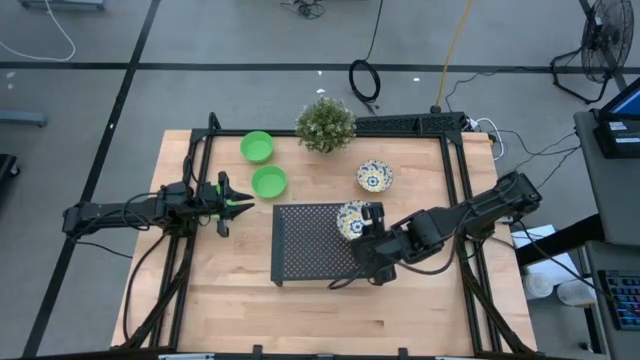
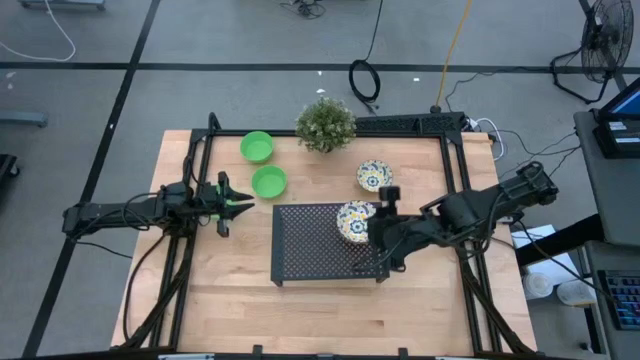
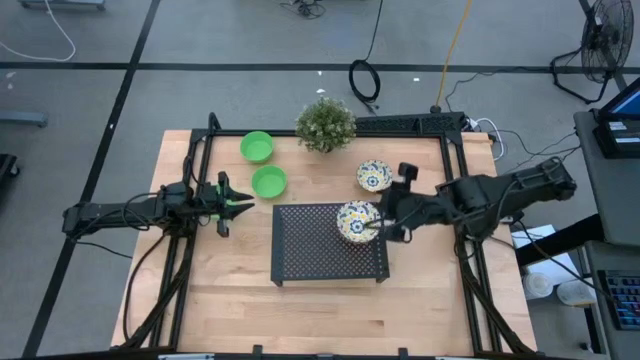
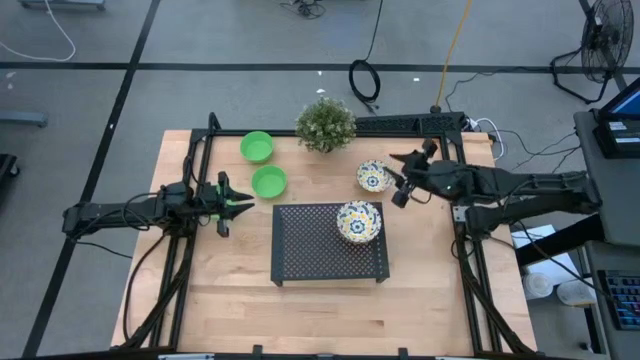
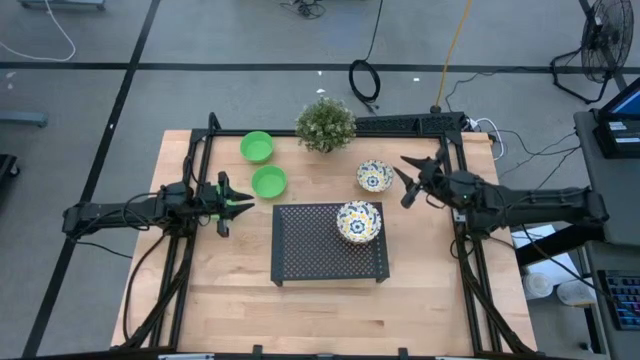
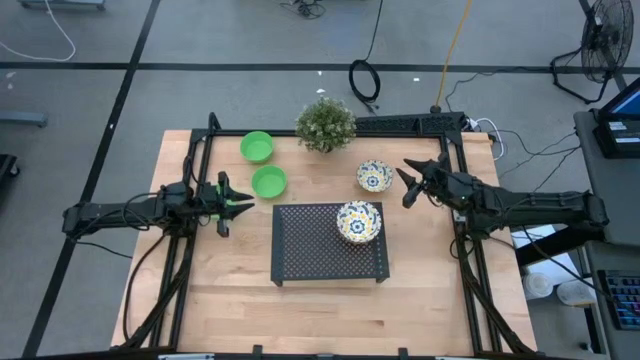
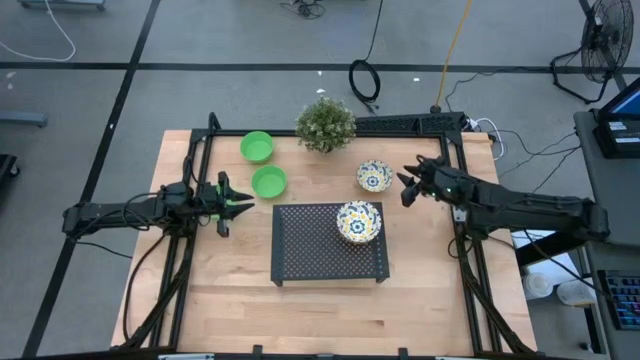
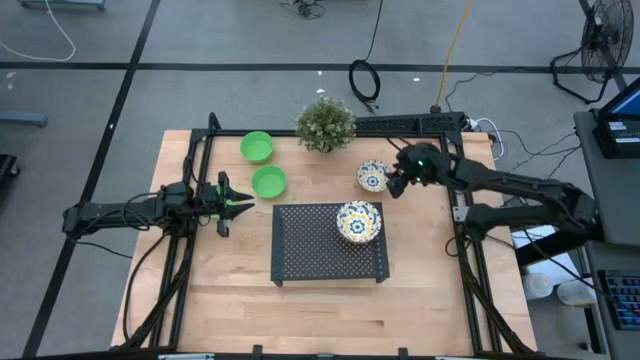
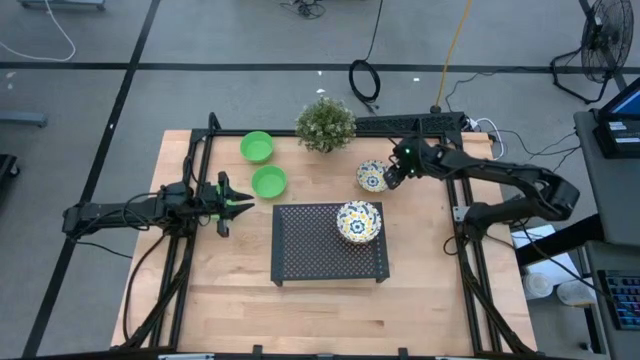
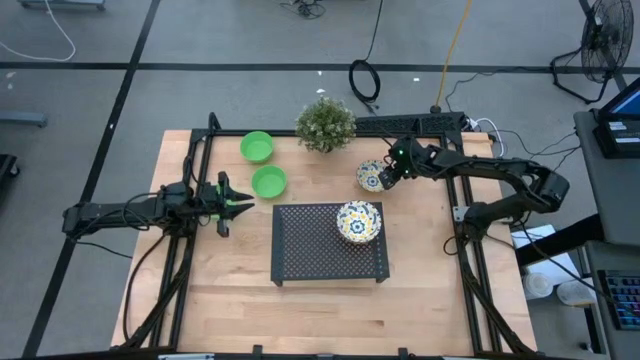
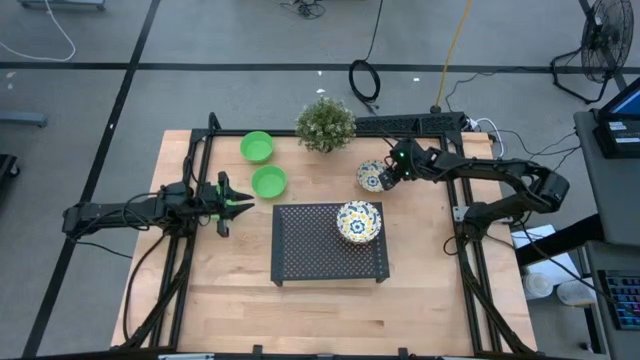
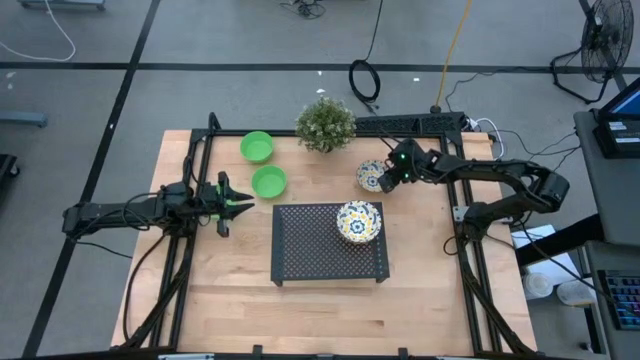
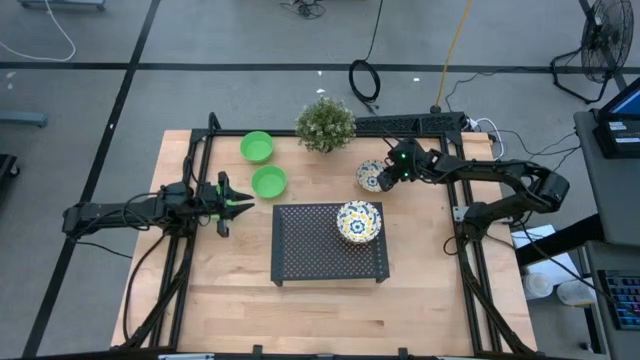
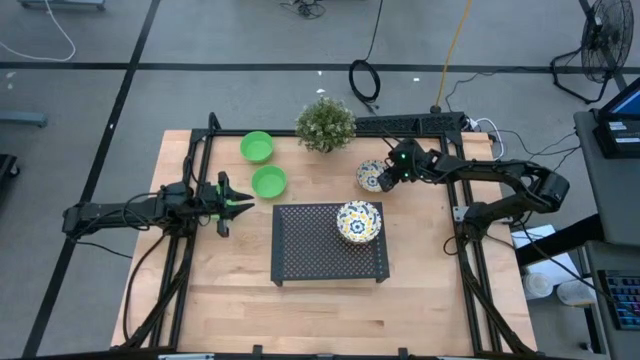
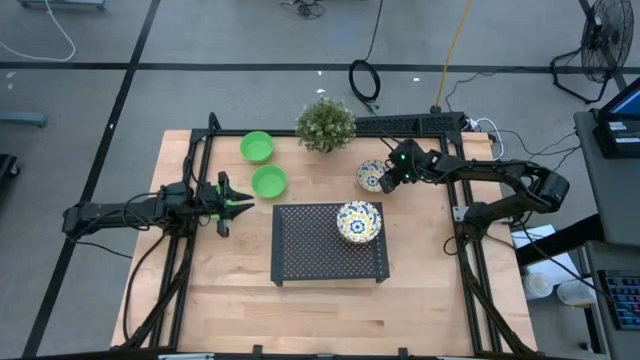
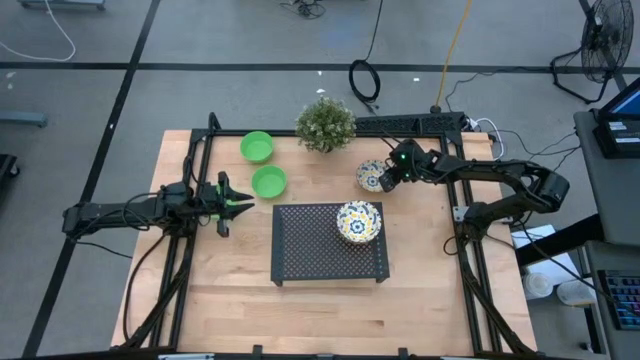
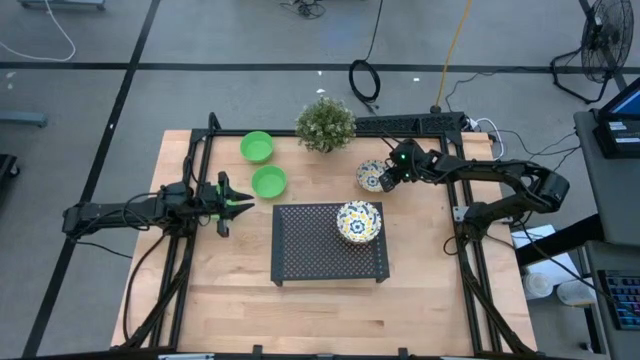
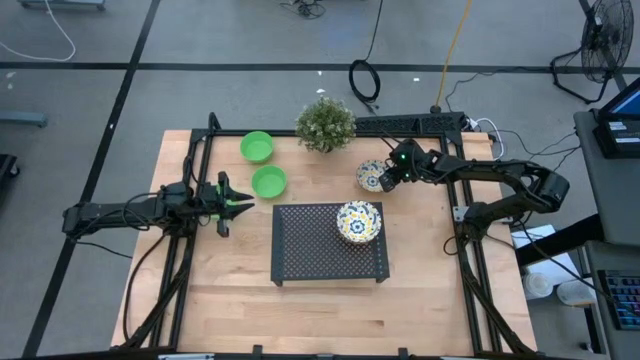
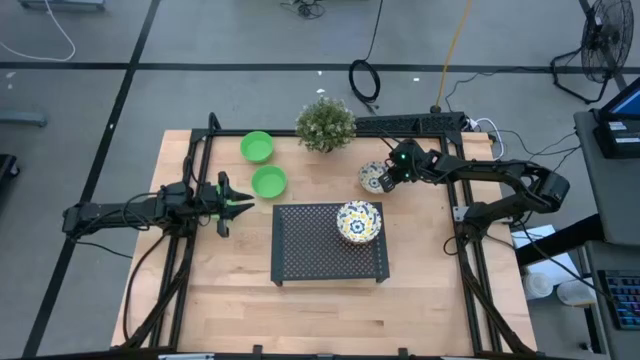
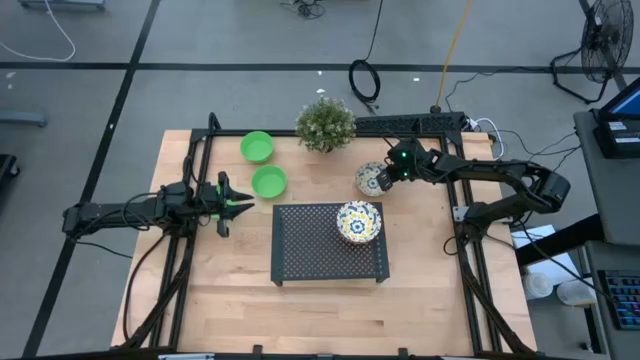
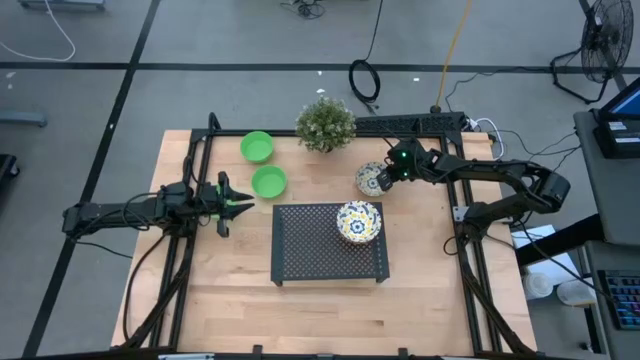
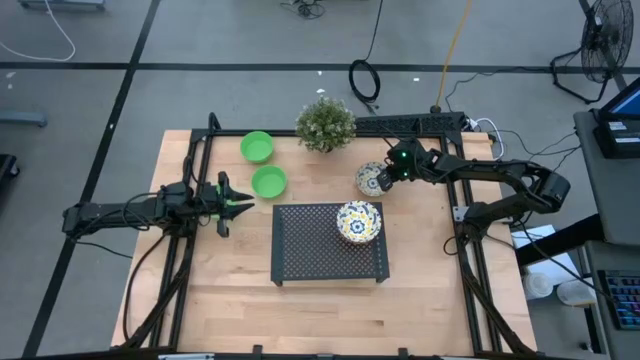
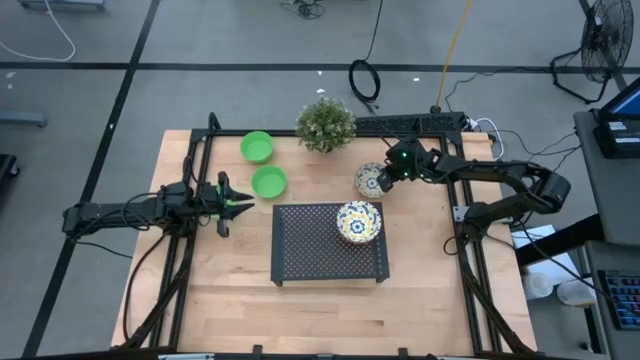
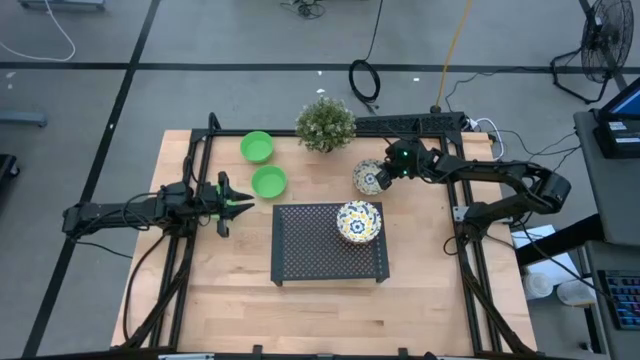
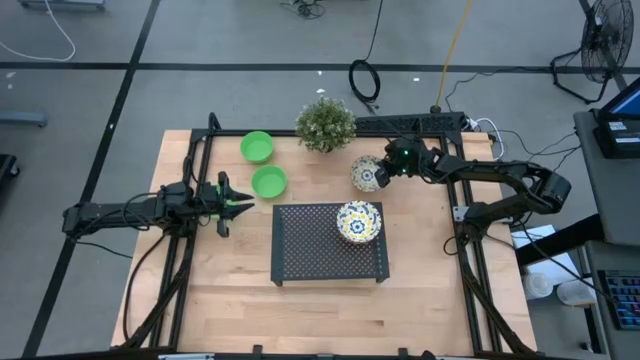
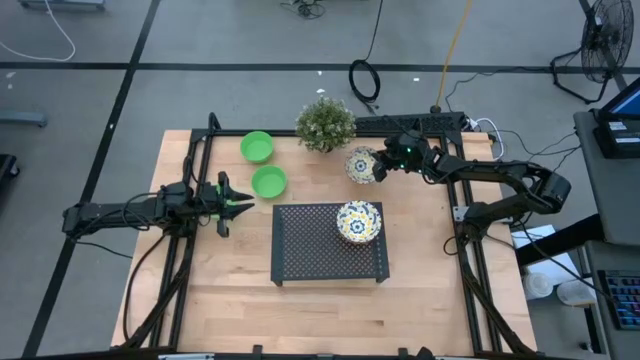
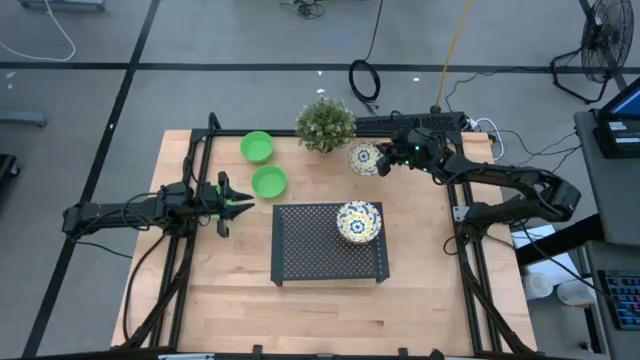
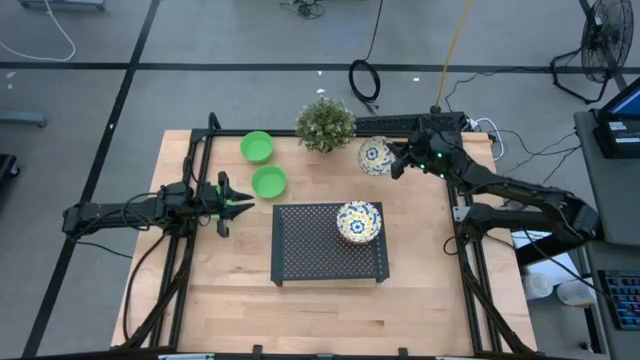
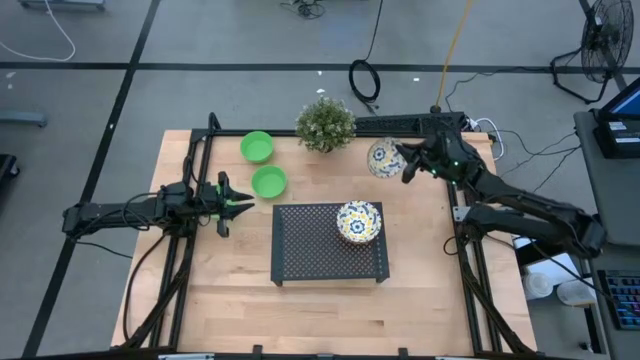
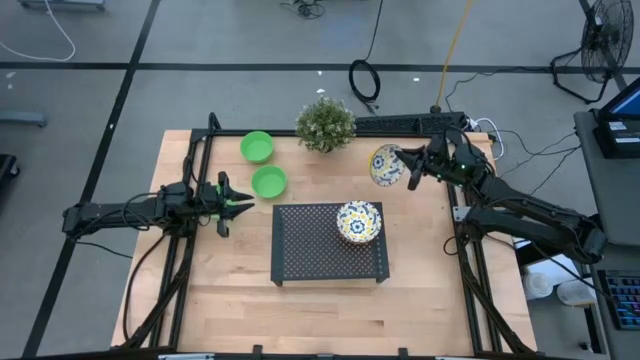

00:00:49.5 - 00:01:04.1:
Task: Pick & Place Mini bowls
Stack the white patterned bowl on top of the white patterned bowls on the shelf

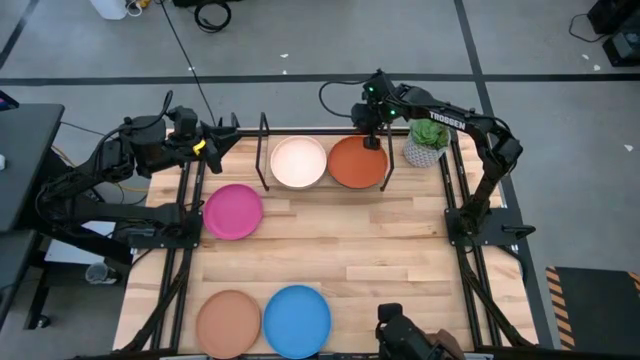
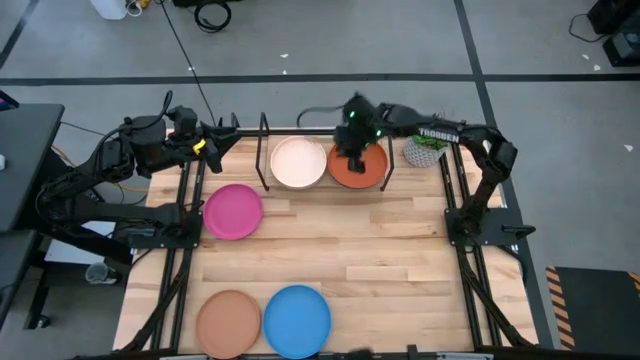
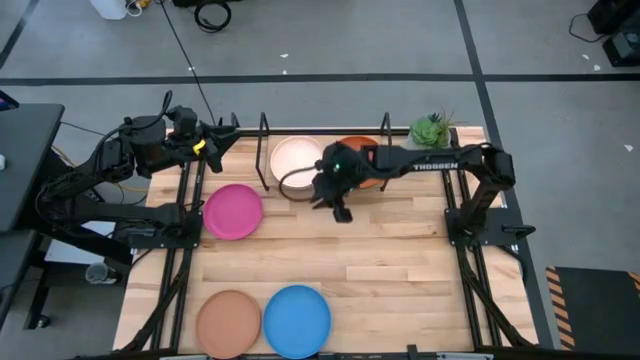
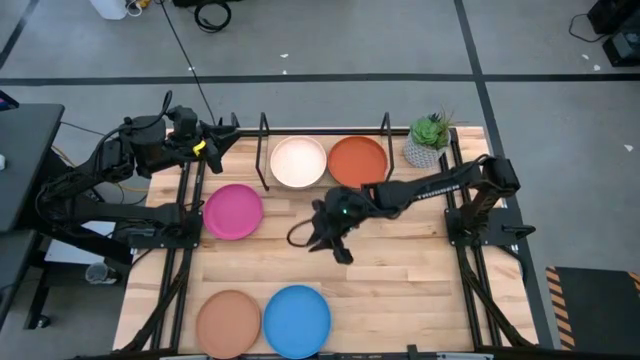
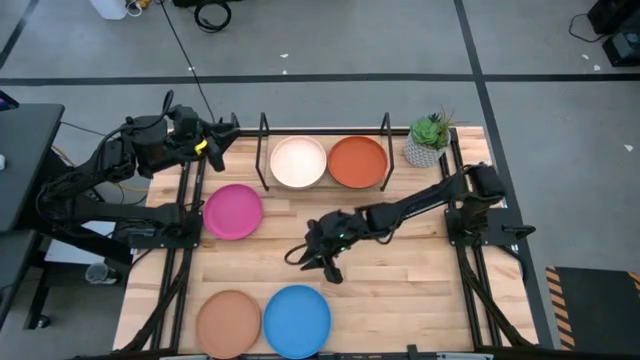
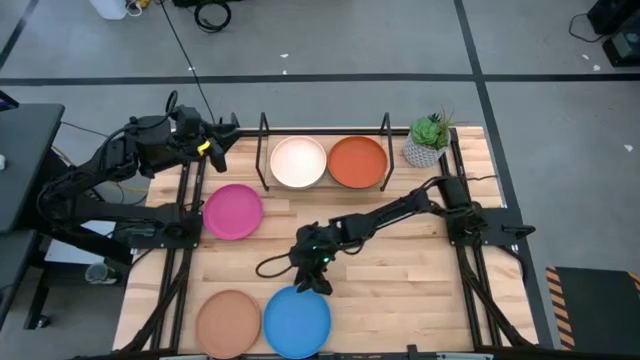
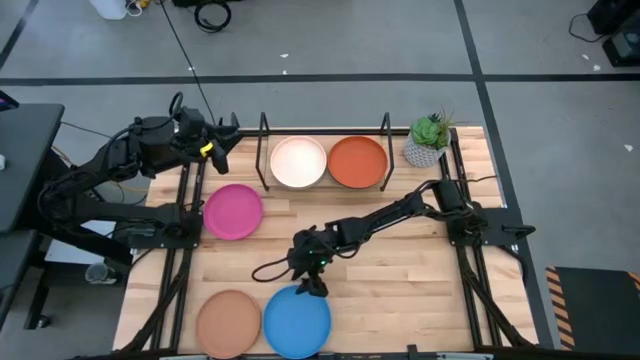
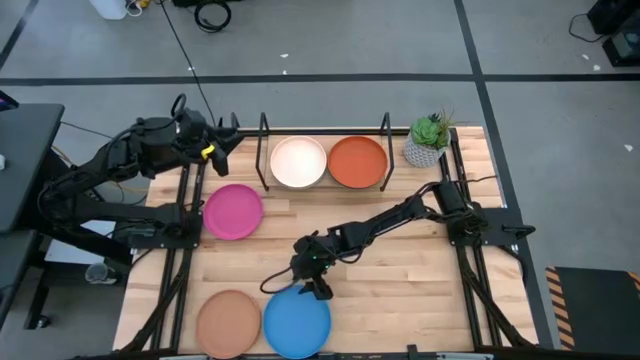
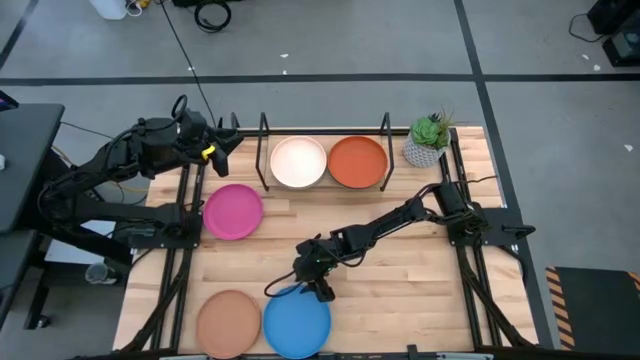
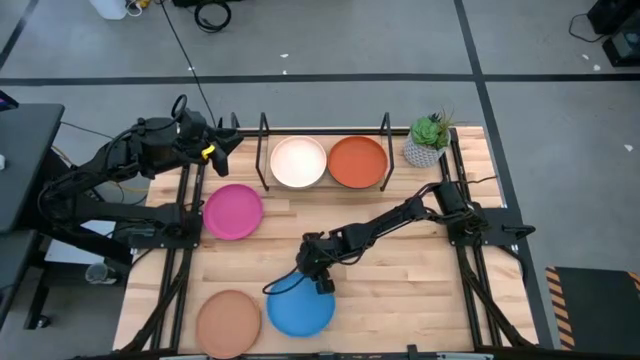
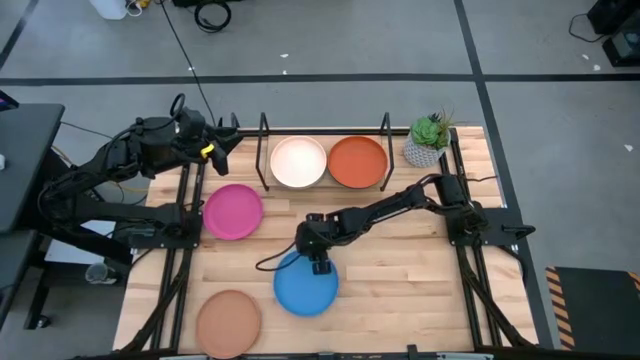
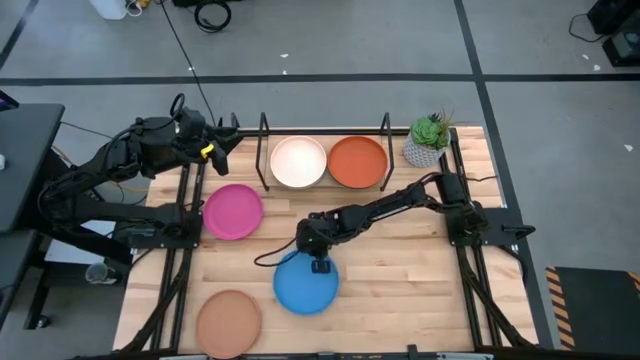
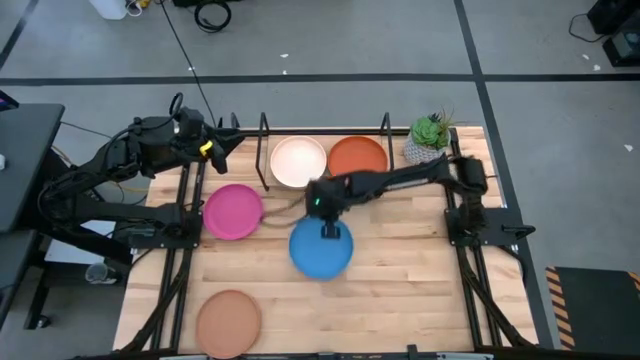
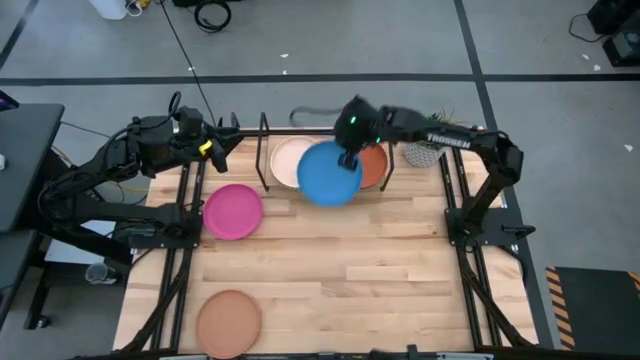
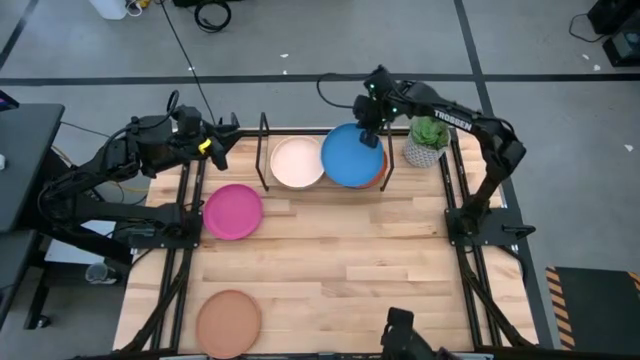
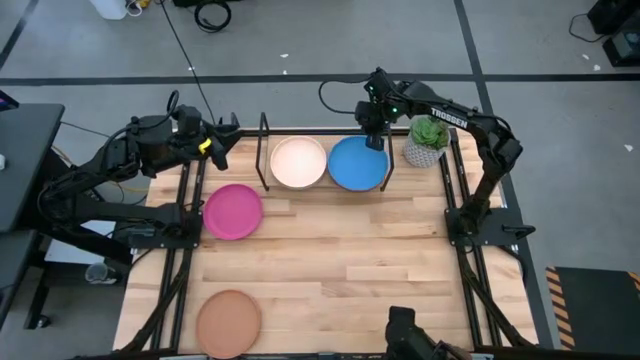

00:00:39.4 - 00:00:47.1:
Task: Place and stack plates onto a shelf
Stack the blue plate on top of the orange plate on the shelf
